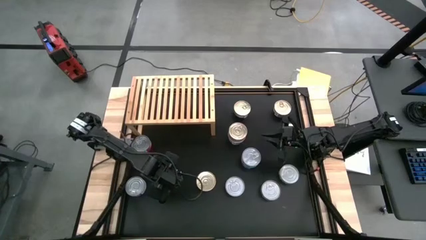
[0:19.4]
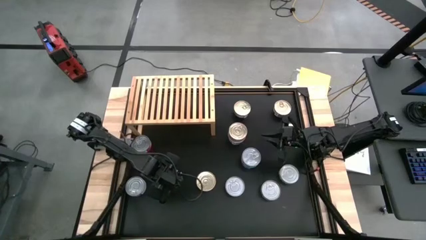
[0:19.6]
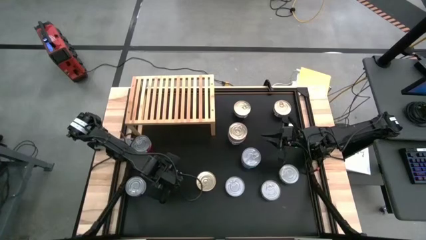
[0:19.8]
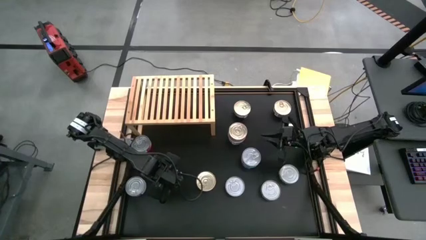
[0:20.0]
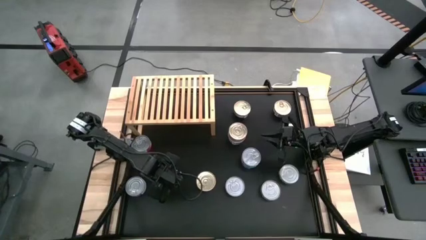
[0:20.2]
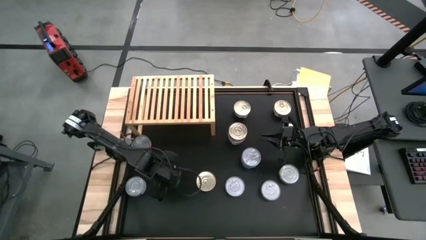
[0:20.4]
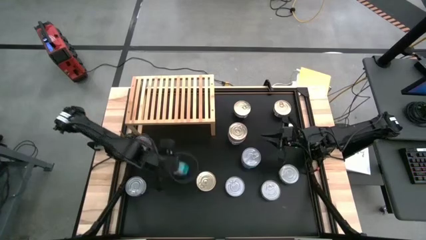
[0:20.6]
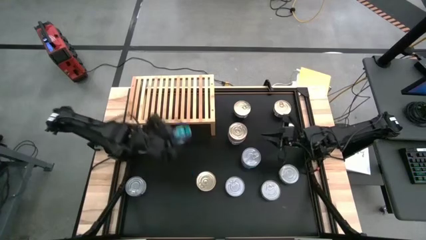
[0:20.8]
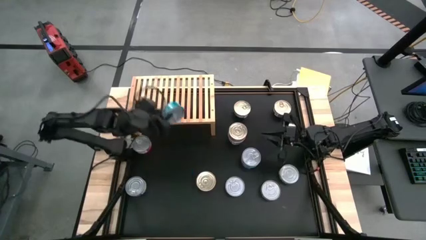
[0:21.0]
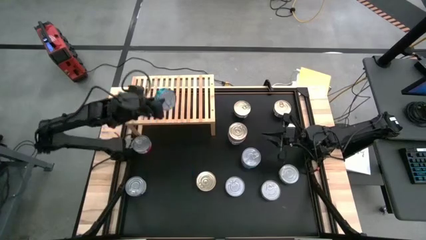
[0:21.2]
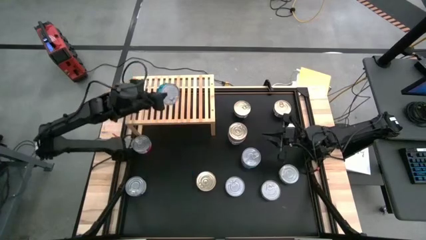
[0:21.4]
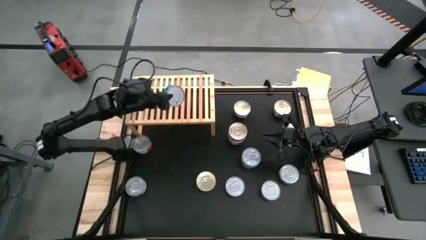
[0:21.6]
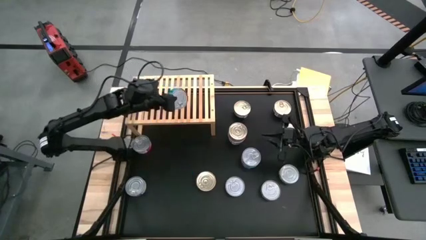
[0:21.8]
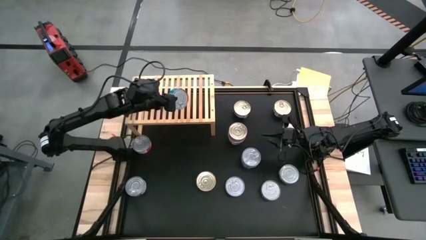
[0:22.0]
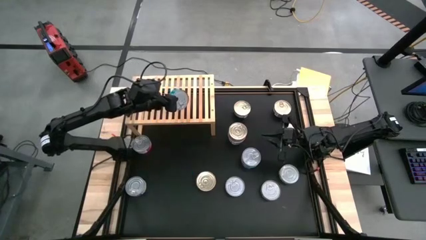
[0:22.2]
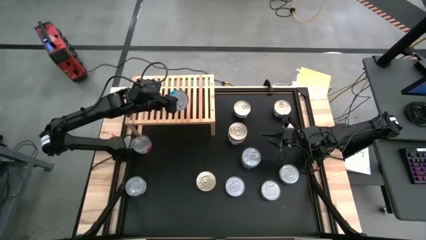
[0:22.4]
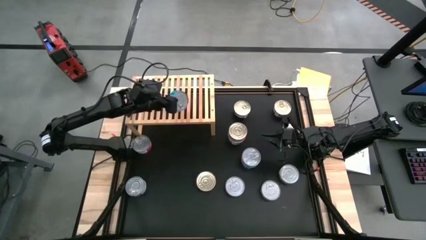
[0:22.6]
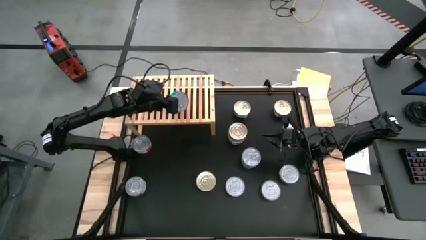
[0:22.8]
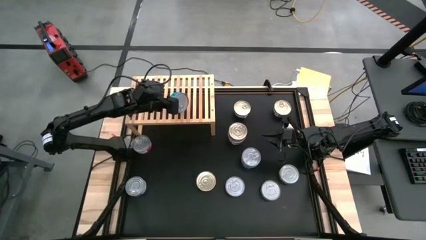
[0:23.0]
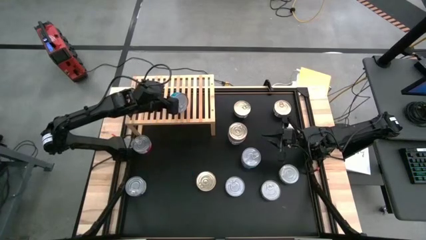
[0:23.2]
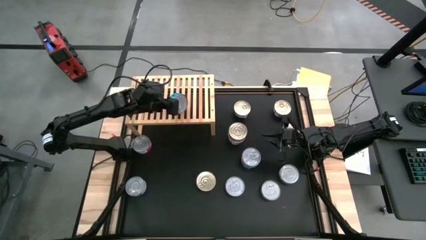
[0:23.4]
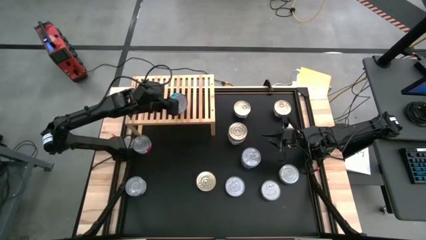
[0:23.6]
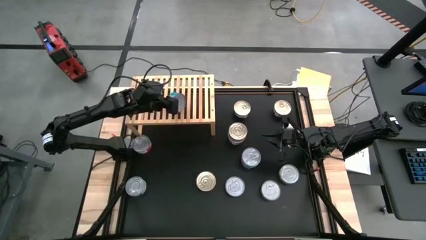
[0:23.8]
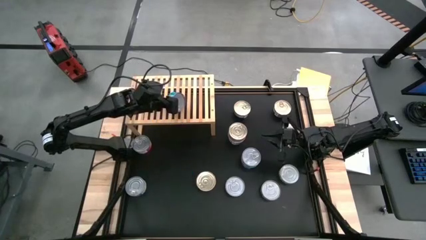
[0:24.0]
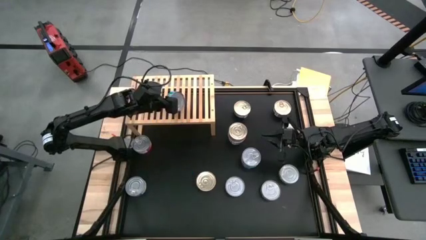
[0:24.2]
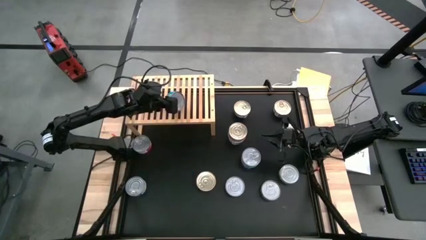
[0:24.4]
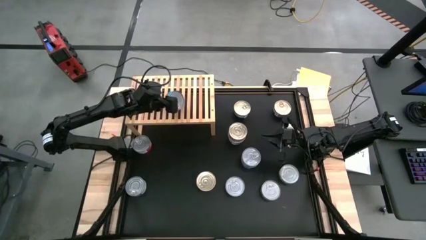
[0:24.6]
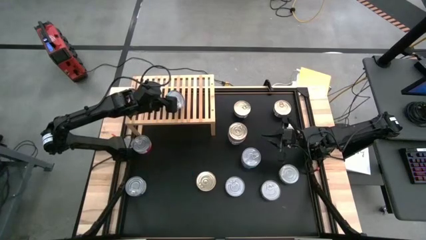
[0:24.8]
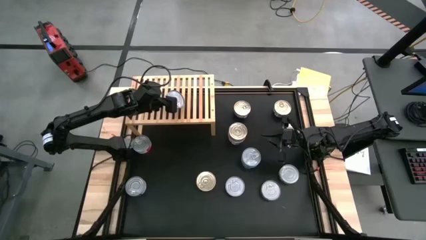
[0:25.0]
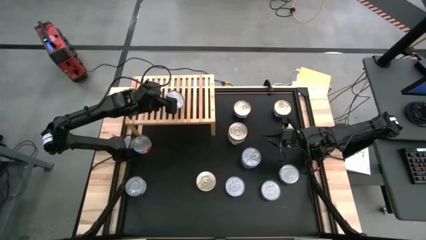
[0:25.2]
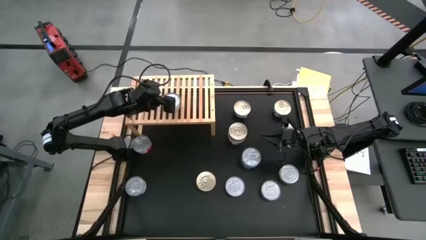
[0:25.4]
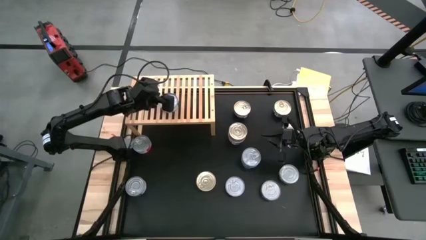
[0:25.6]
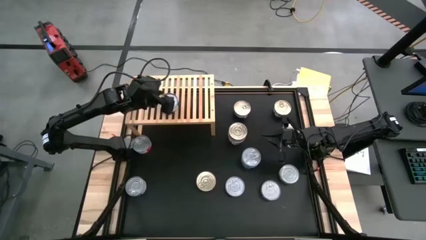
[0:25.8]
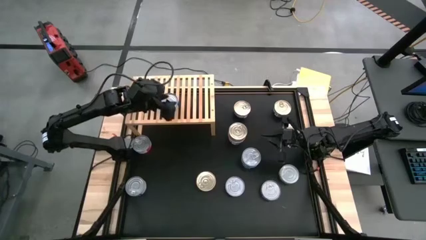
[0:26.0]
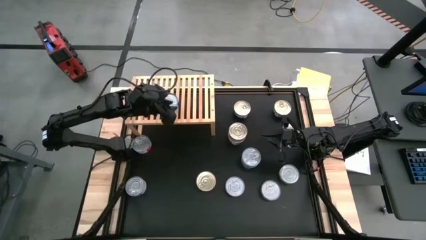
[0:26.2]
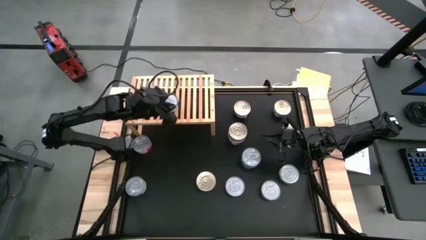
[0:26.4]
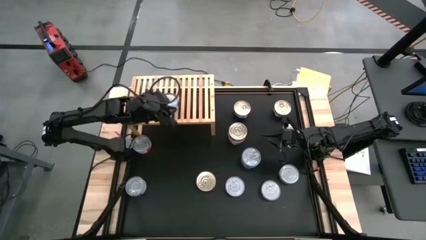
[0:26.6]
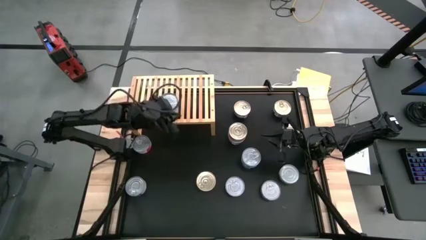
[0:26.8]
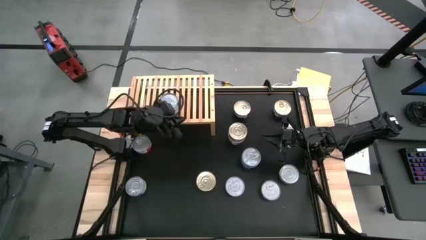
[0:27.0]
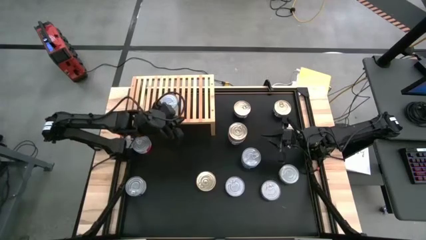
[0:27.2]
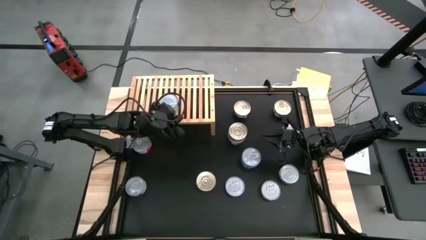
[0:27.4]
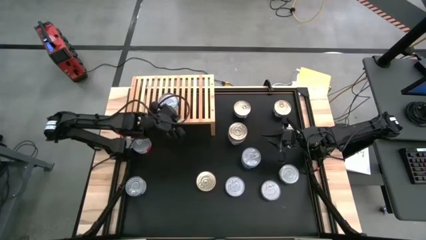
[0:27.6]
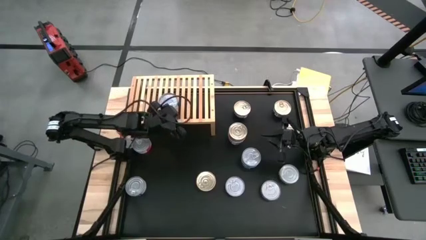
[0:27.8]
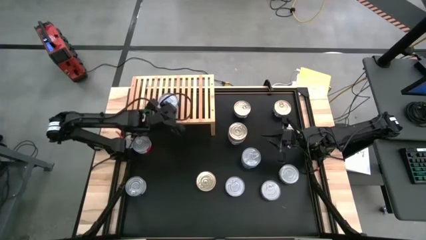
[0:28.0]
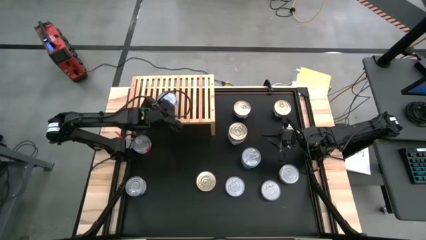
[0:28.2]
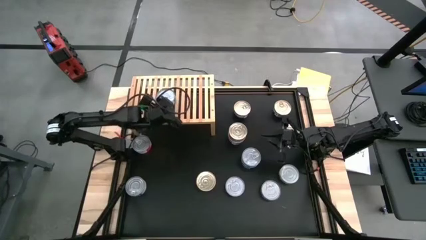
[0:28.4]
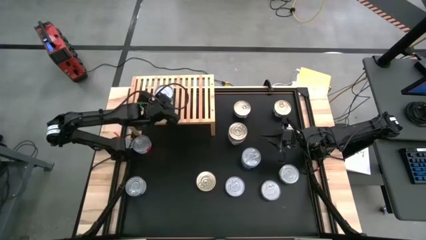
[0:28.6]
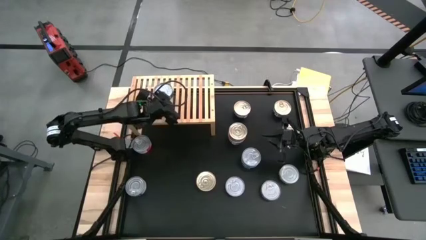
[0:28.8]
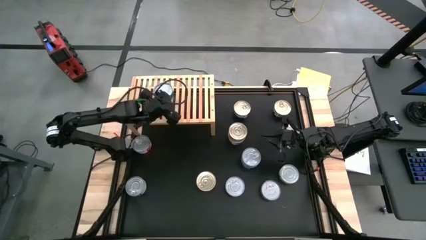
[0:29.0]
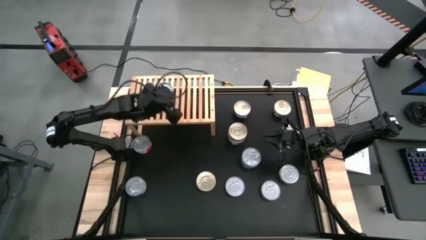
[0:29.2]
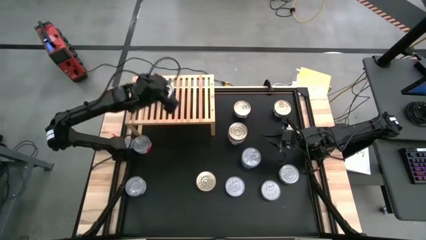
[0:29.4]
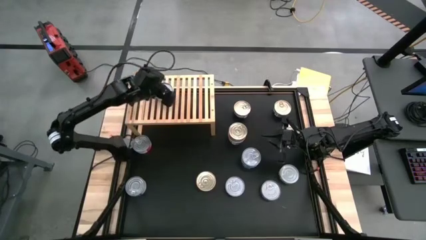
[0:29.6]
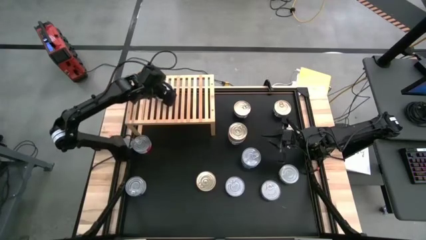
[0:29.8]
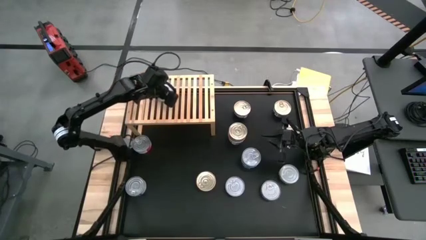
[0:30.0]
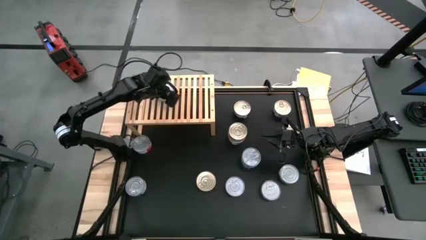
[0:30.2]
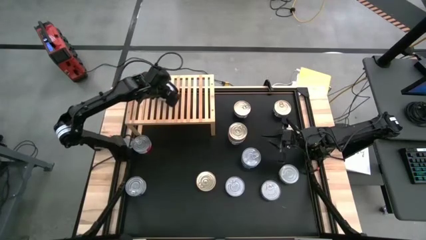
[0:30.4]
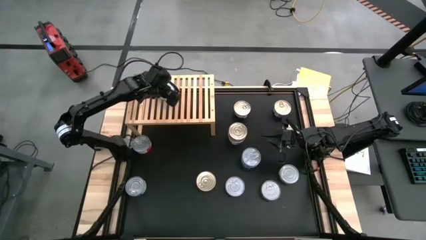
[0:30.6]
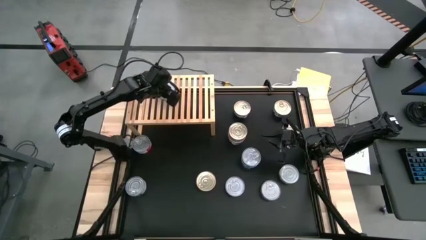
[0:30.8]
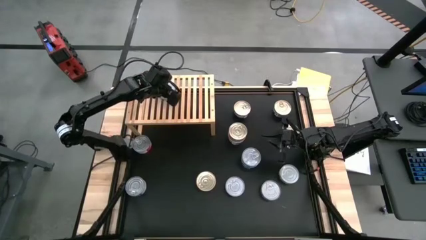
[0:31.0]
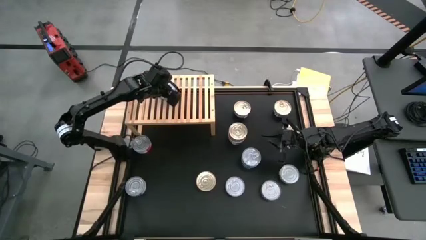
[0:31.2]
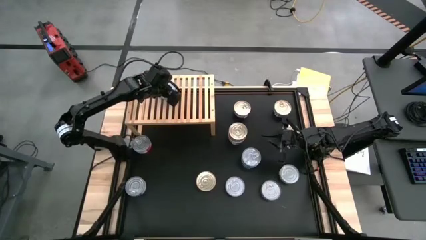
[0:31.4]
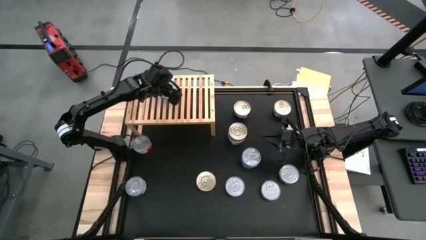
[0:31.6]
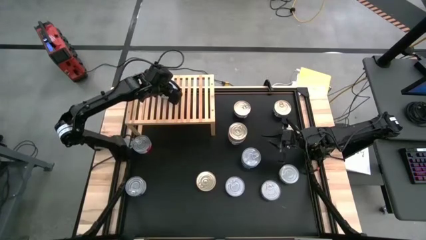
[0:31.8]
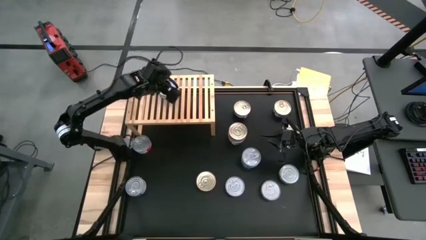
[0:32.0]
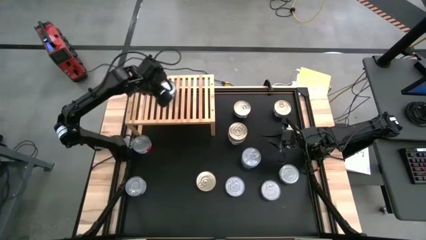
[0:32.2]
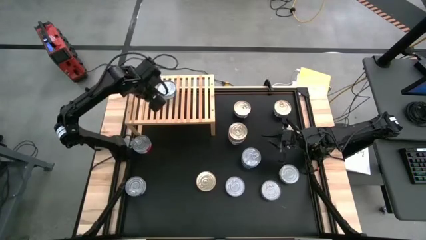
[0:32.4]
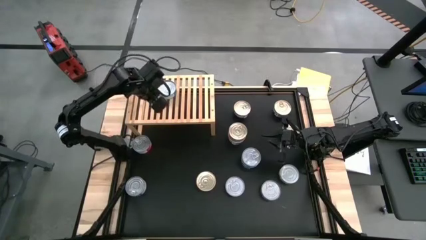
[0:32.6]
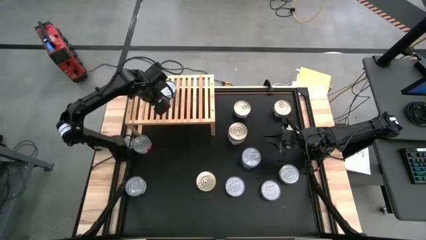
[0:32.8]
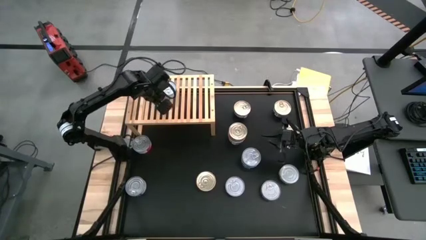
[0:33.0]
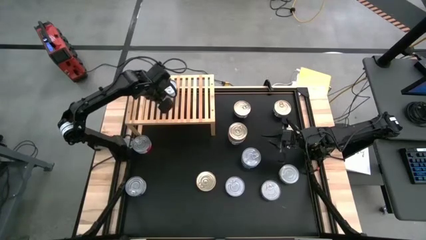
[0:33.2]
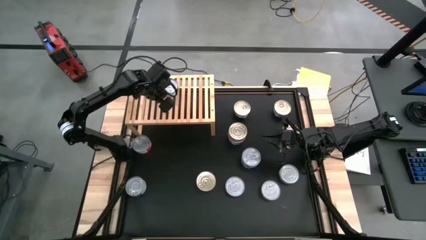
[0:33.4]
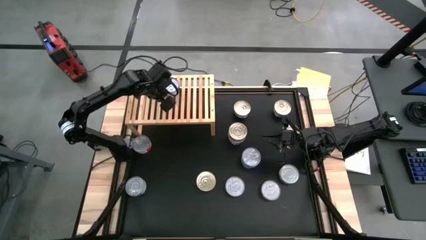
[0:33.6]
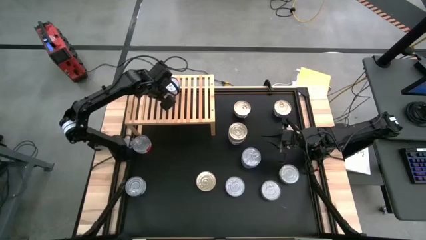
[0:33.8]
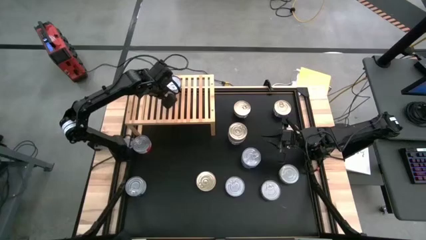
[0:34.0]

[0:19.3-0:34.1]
Task: Stack canned seafood by type on shelf
Put the green blue tuna can on the shelf
